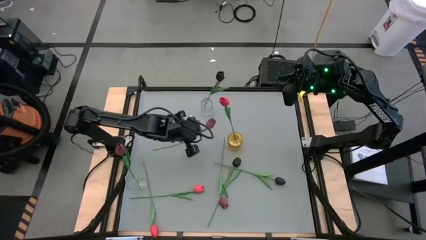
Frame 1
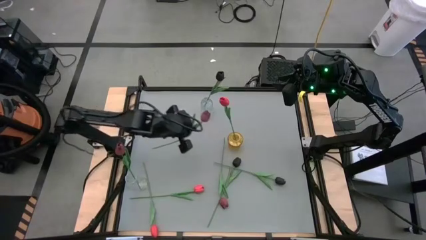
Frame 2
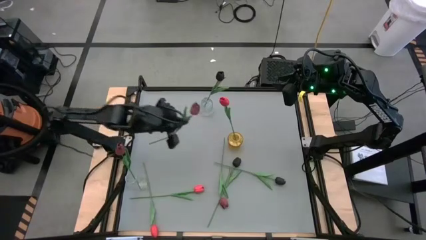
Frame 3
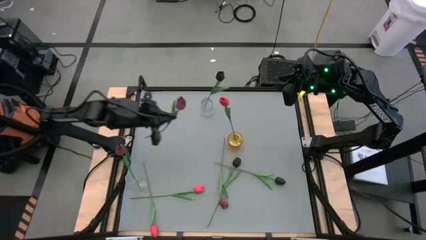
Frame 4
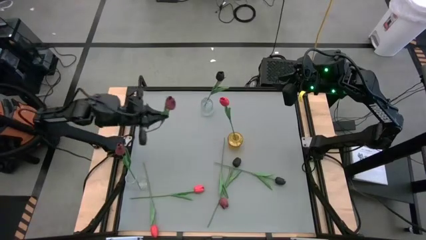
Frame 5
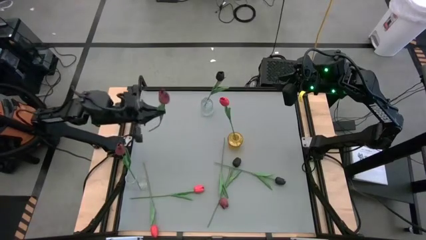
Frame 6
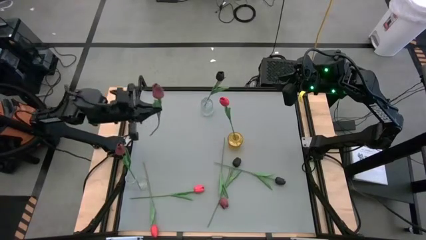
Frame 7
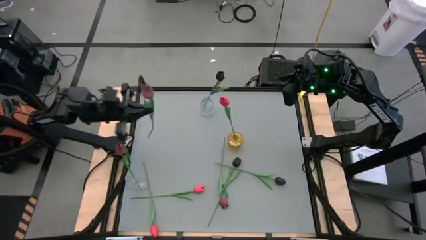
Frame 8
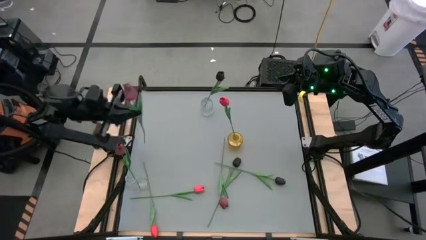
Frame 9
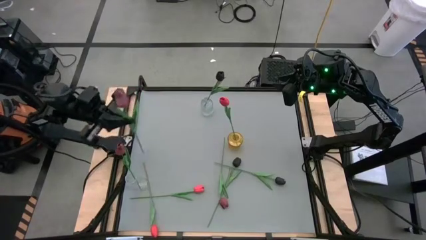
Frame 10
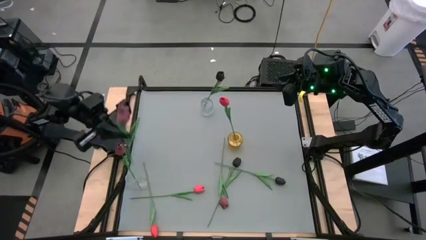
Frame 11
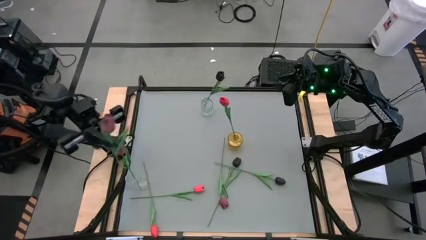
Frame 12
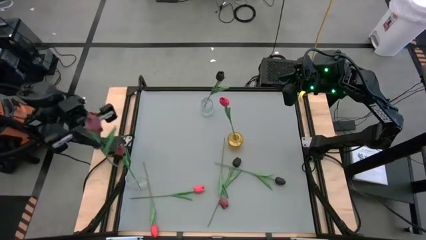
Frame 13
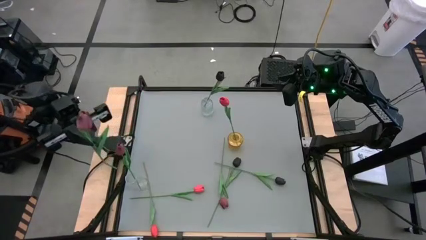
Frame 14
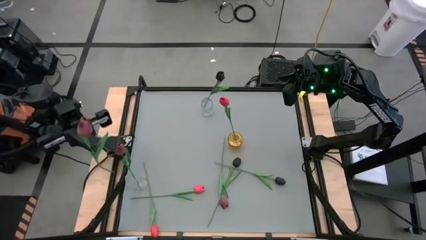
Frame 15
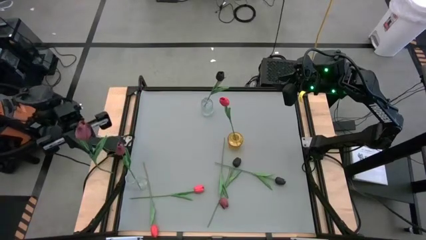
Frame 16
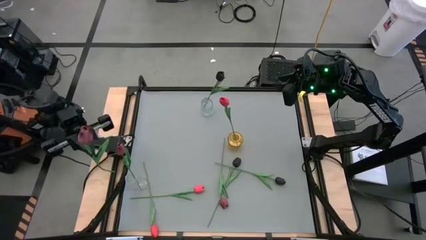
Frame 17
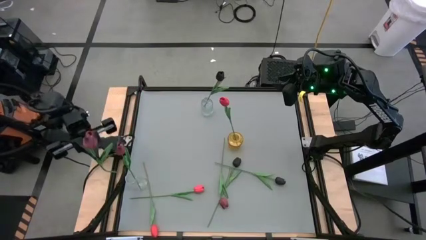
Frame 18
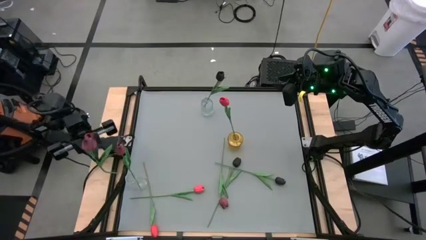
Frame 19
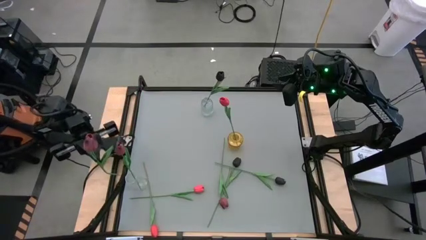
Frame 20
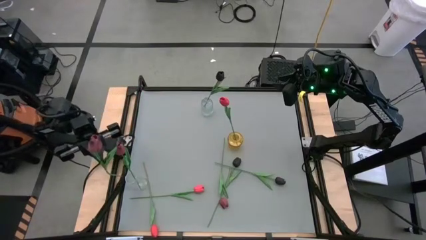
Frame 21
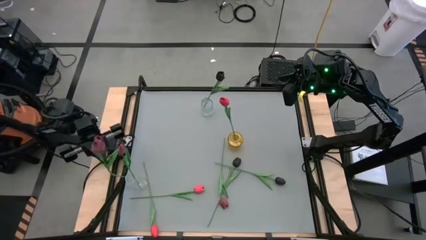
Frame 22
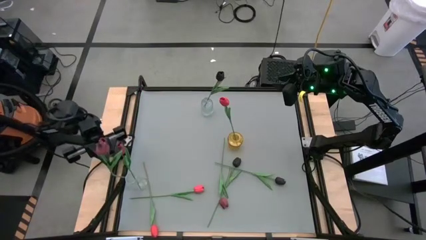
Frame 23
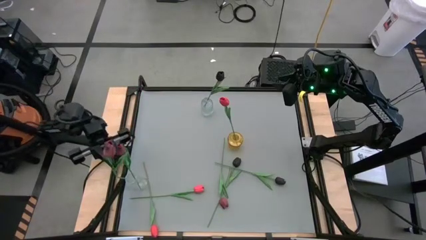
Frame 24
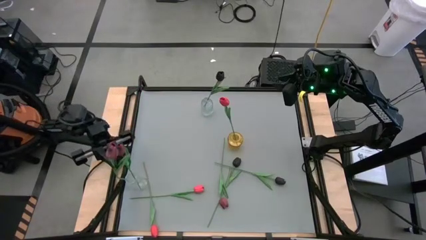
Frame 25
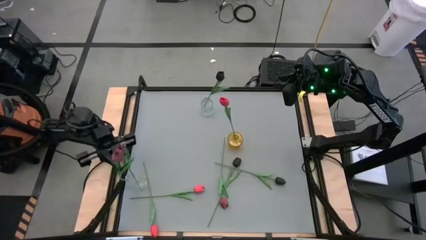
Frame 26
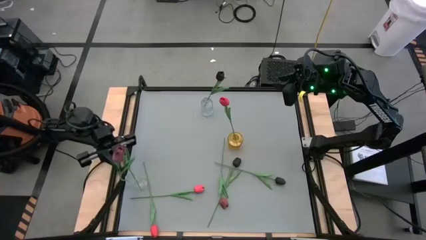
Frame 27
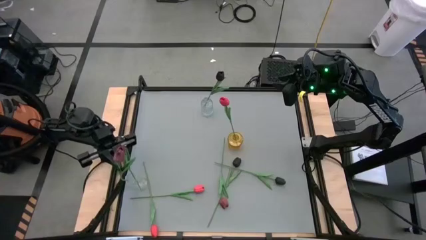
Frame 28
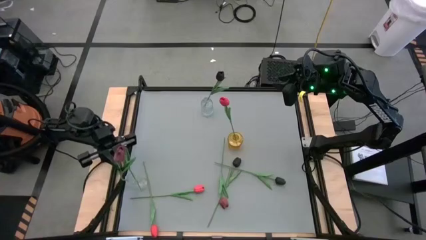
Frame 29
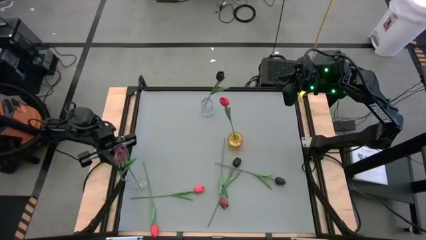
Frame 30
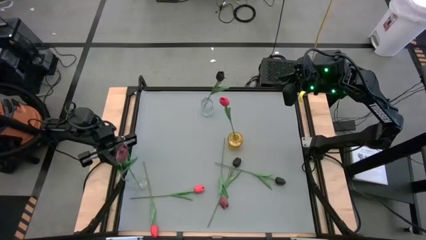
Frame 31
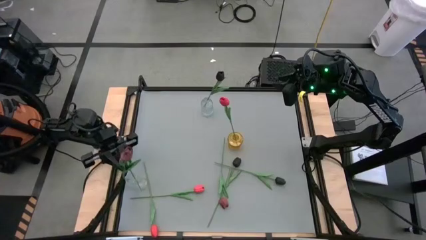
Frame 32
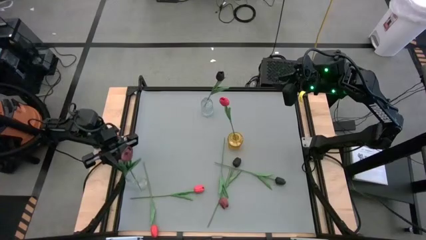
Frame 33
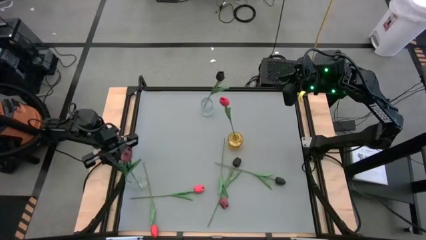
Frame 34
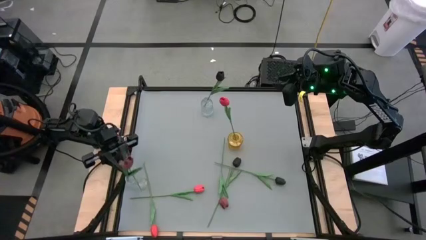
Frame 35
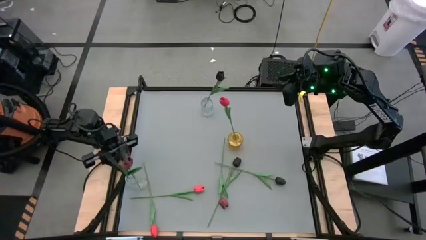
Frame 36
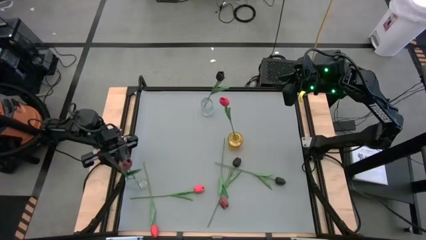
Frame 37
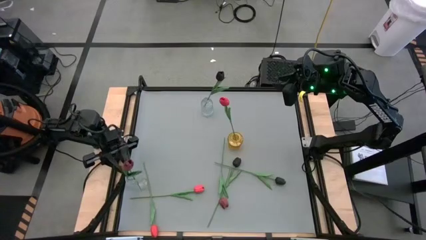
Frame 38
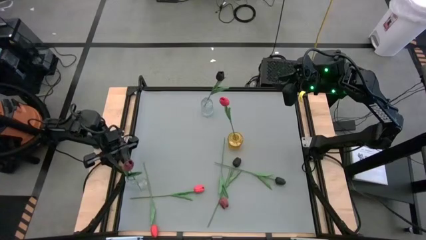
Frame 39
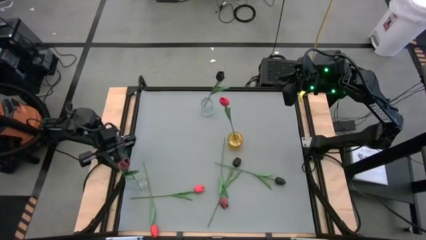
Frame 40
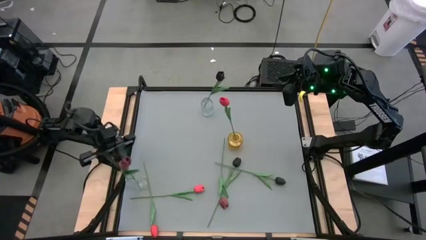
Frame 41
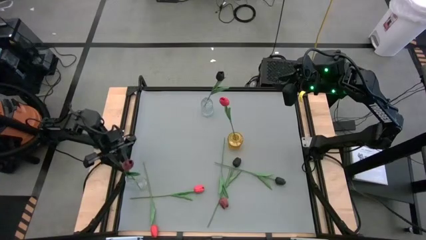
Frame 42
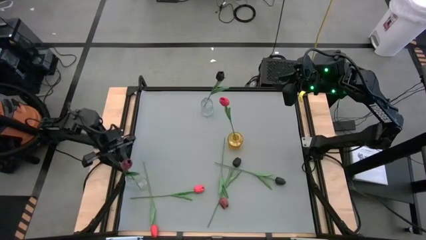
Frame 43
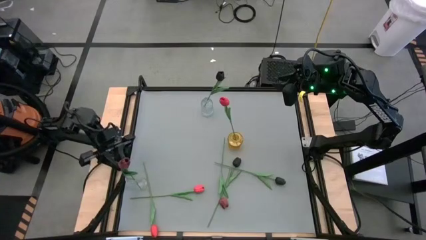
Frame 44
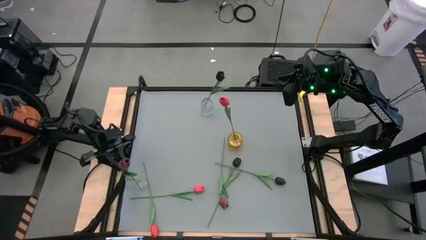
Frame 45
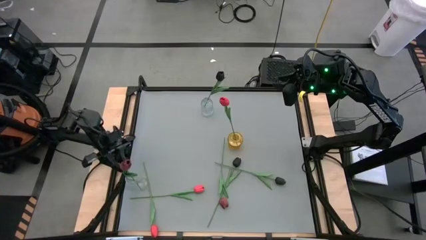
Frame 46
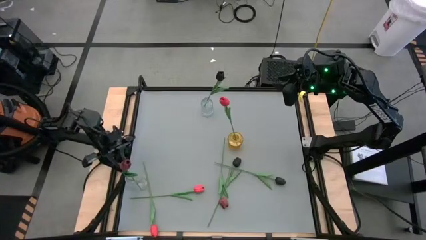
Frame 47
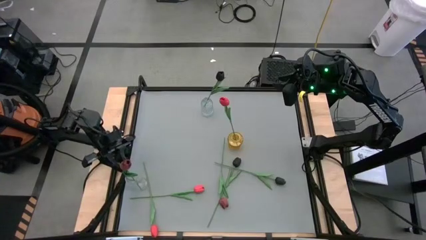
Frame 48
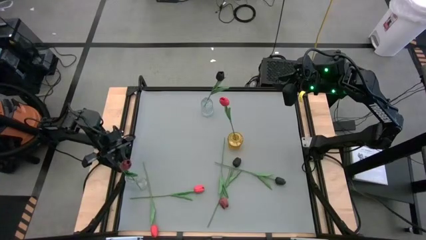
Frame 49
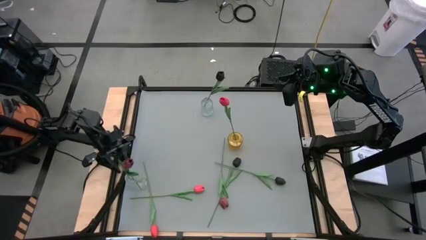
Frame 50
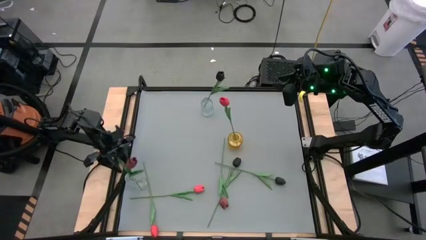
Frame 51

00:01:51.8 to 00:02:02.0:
Task: Sort flowers into vase by color
Put the left red tulip into the bottom transparent vase

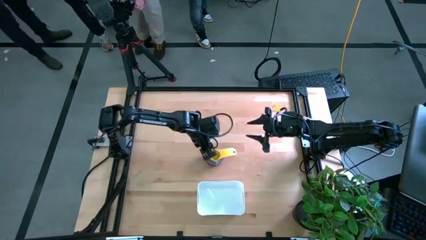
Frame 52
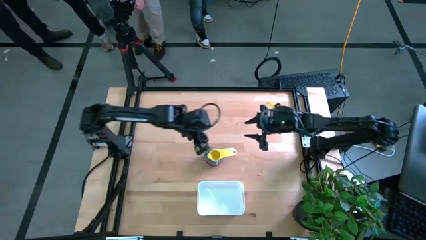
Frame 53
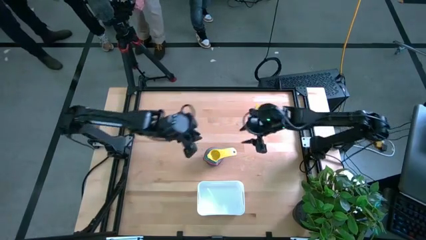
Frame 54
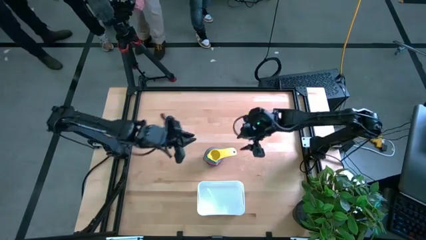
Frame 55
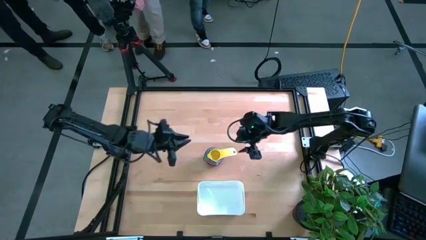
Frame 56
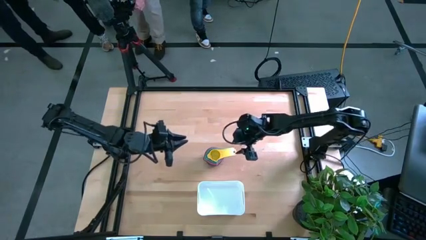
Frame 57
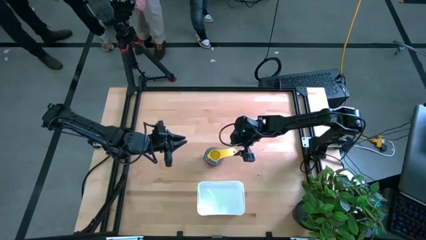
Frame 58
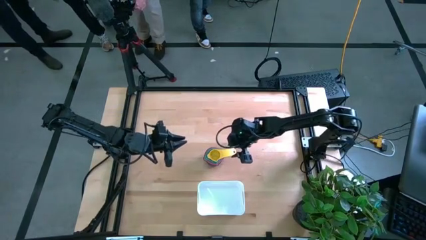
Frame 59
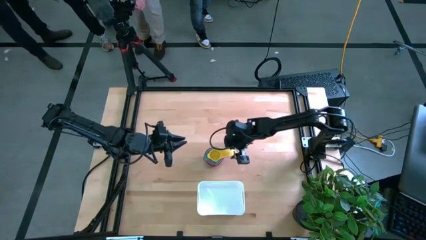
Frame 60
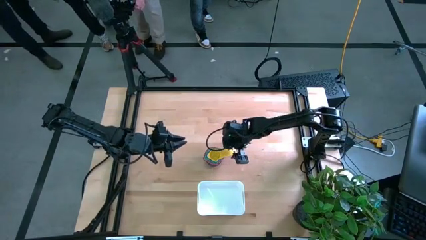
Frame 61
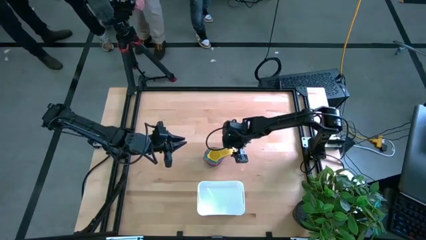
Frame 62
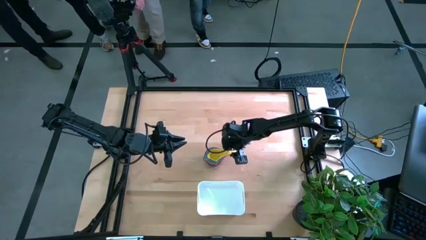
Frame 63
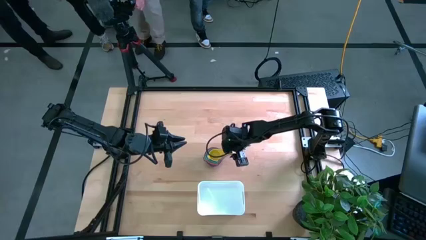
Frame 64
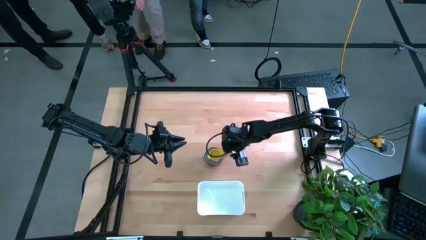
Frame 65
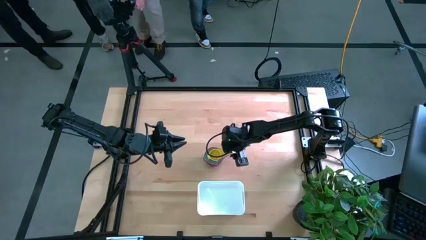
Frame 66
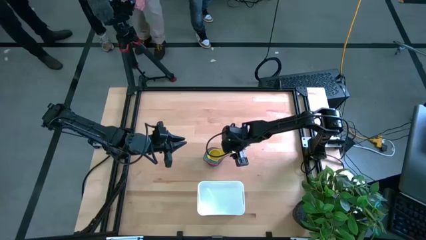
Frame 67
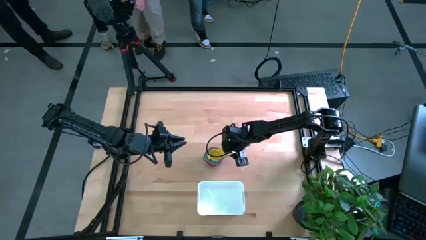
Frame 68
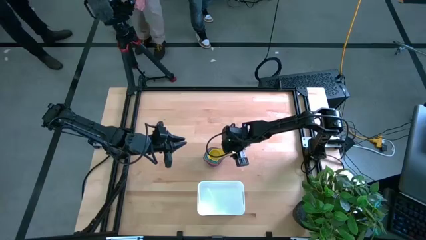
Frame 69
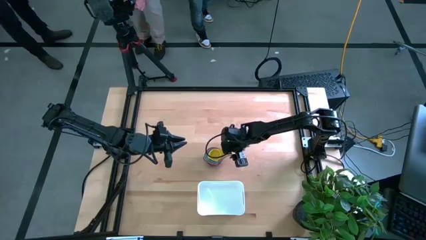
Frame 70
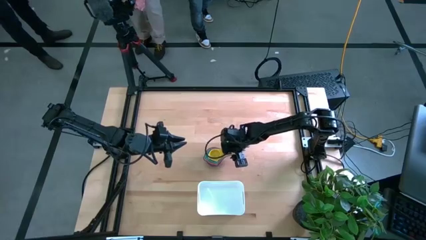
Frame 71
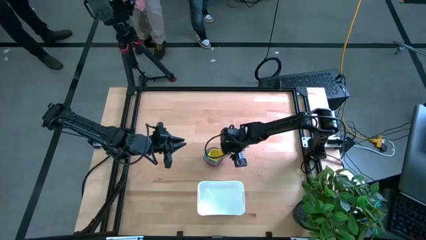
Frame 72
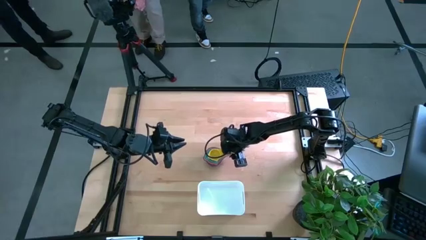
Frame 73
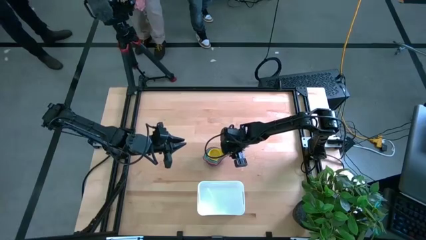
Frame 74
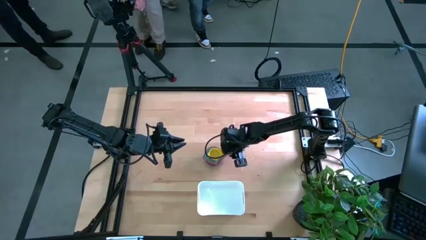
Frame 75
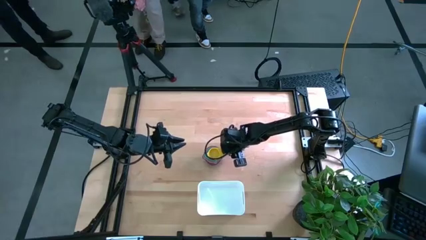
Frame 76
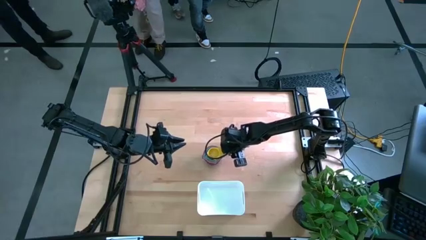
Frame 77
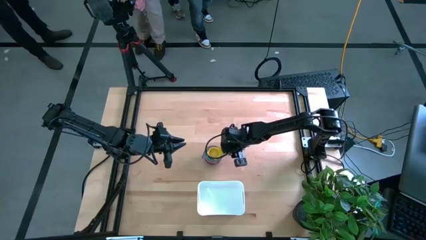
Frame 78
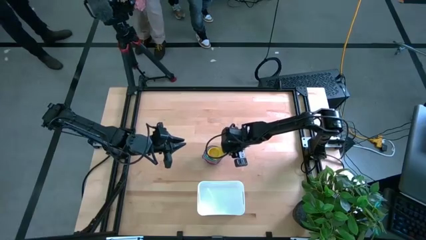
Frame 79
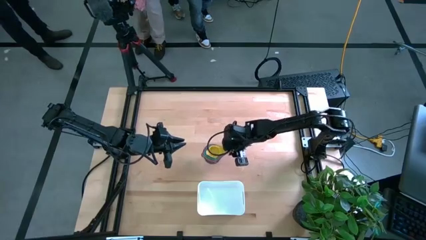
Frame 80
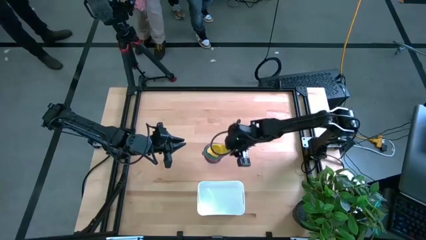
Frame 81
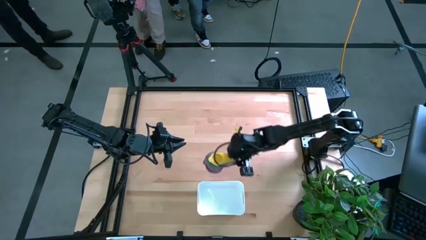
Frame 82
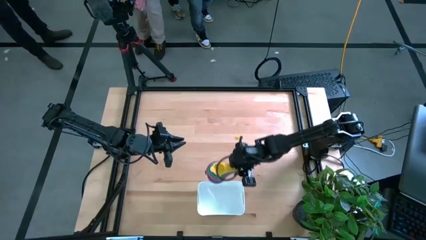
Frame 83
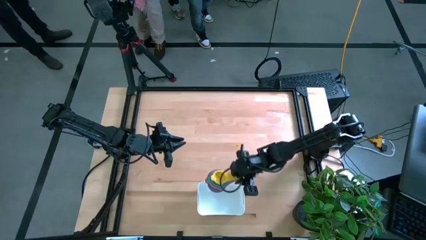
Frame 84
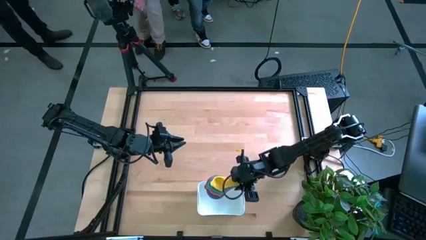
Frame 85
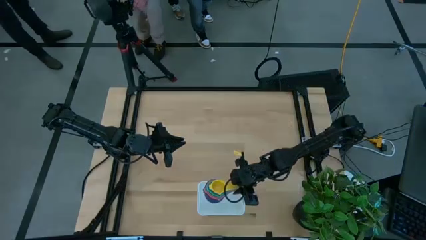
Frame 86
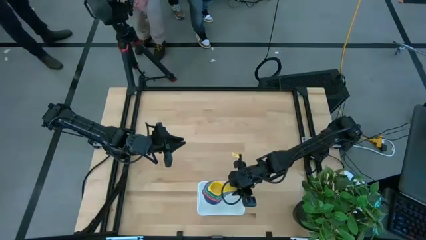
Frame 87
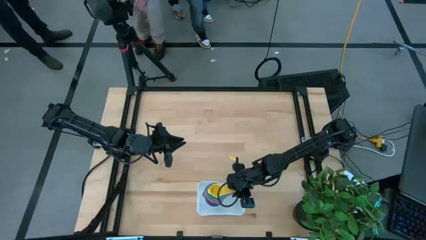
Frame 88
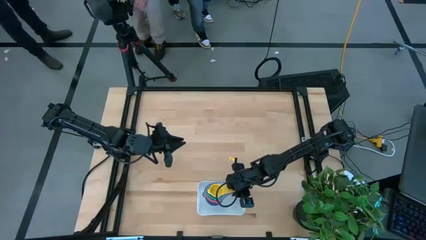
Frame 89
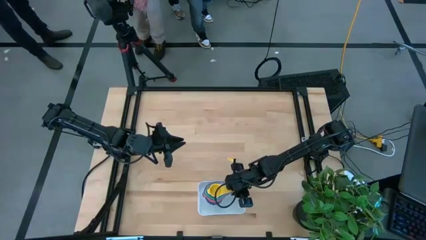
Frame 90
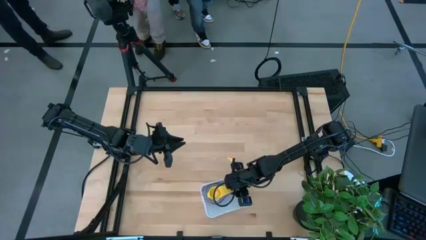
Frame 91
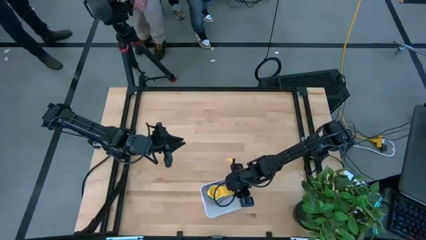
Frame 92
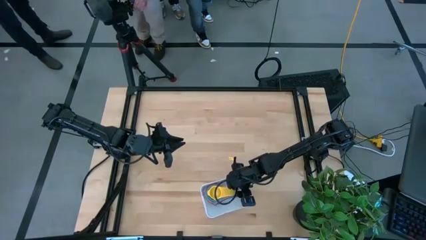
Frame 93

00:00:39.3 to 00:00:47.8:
Task: Nest measuring cups in basket
Put the stacked measuring cups into the white bin
